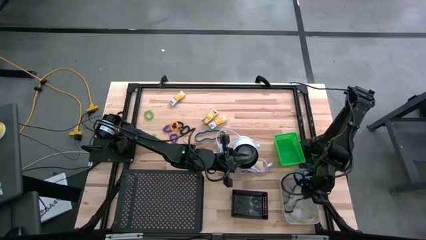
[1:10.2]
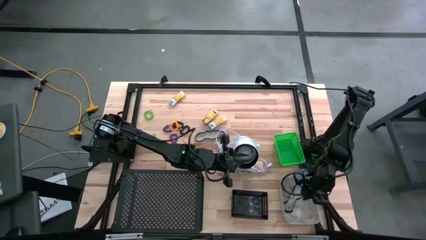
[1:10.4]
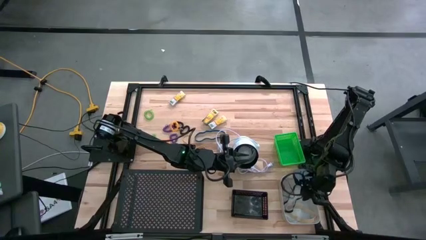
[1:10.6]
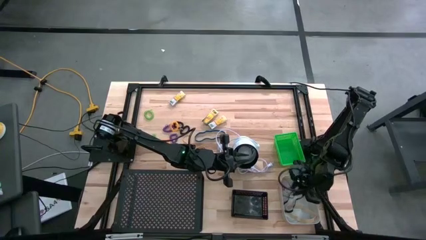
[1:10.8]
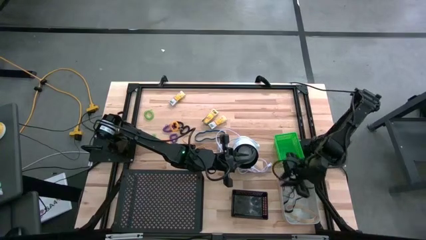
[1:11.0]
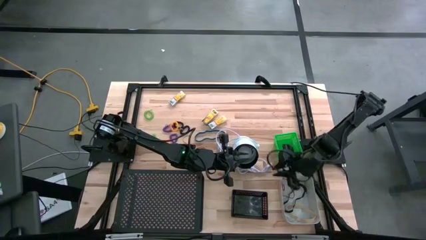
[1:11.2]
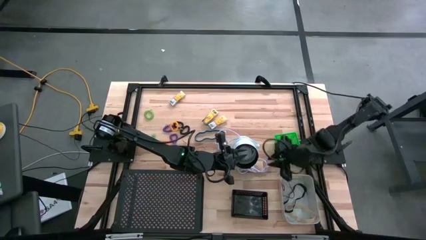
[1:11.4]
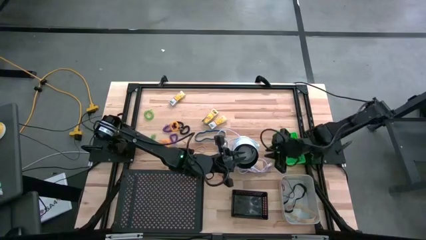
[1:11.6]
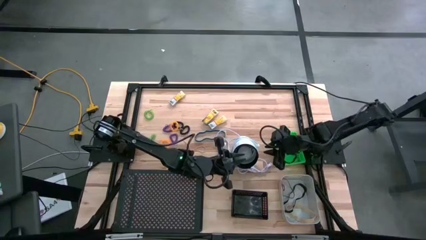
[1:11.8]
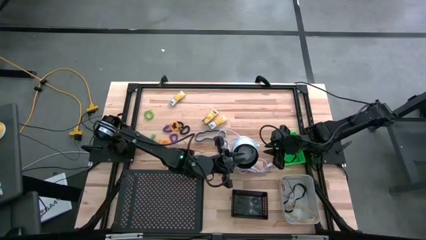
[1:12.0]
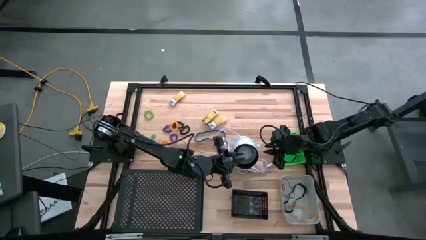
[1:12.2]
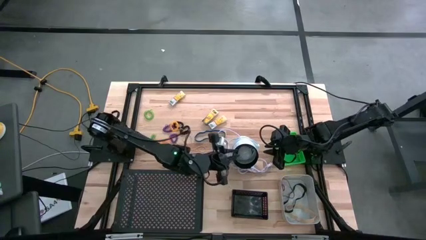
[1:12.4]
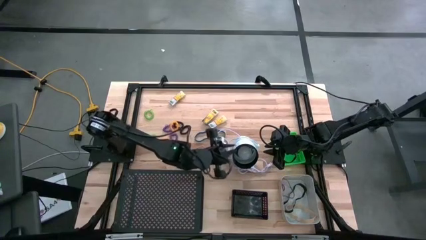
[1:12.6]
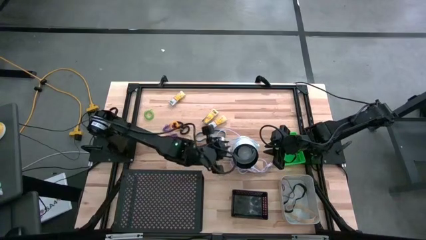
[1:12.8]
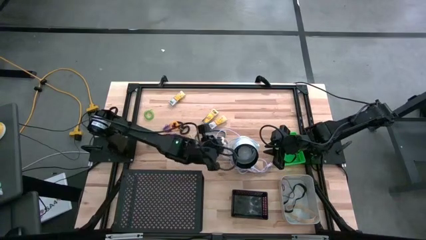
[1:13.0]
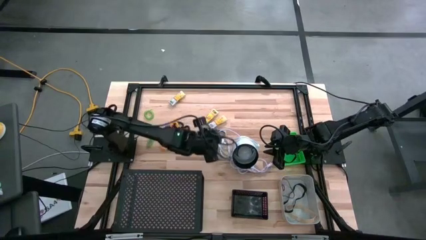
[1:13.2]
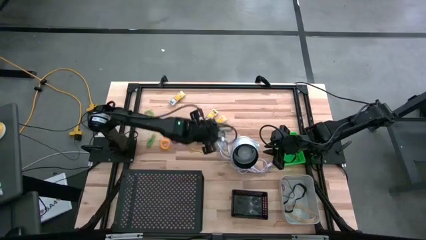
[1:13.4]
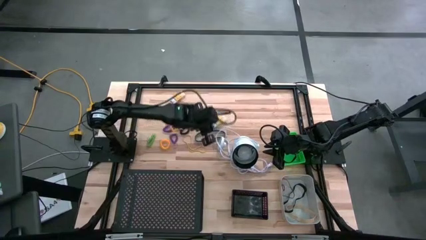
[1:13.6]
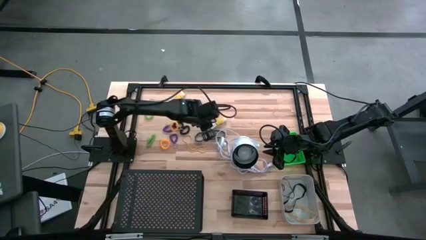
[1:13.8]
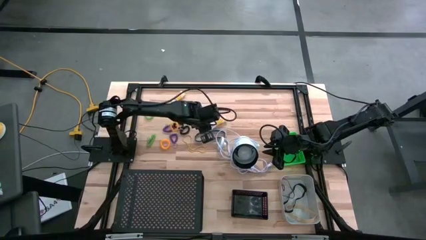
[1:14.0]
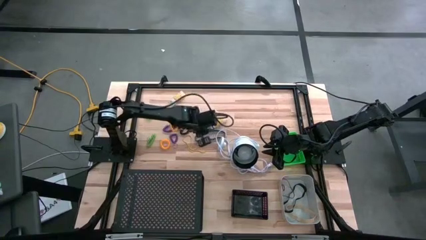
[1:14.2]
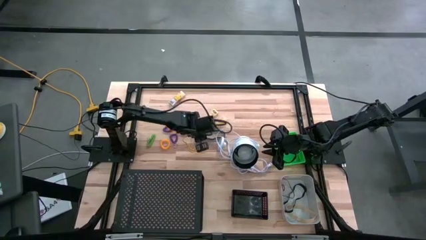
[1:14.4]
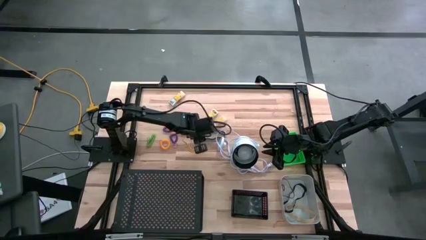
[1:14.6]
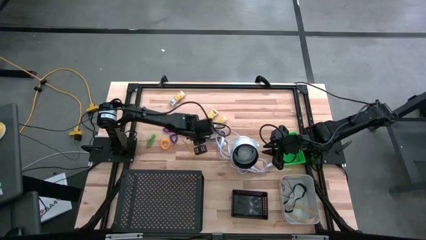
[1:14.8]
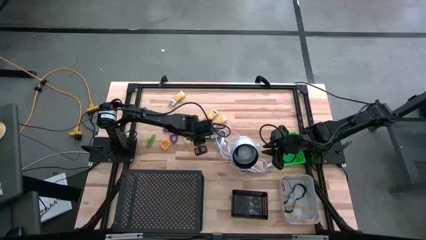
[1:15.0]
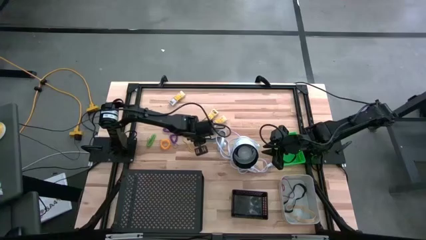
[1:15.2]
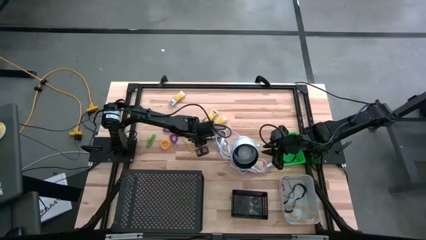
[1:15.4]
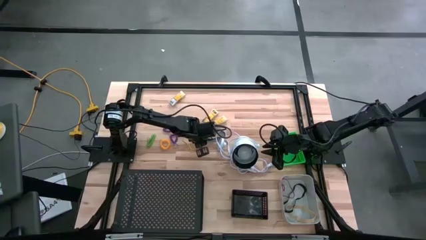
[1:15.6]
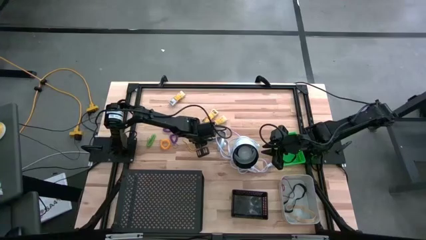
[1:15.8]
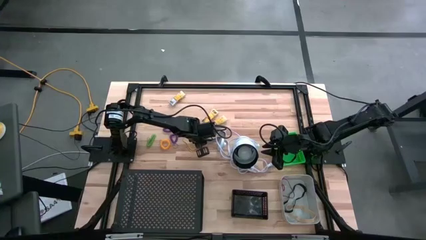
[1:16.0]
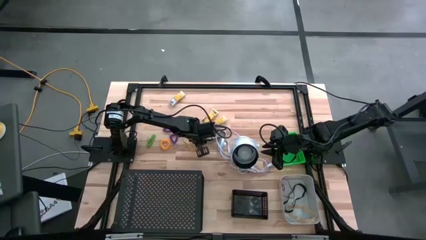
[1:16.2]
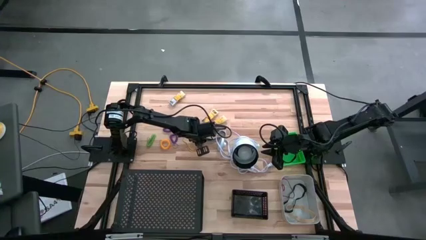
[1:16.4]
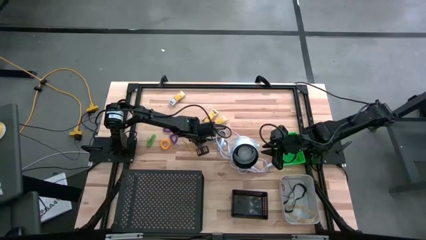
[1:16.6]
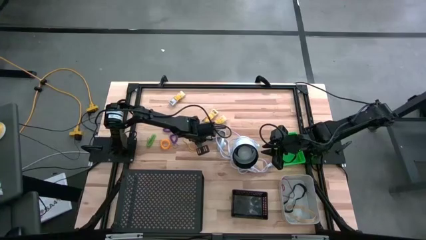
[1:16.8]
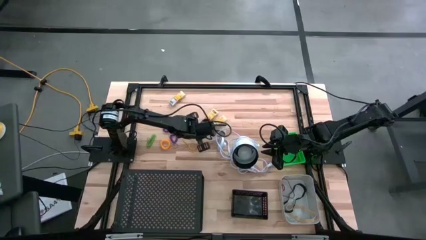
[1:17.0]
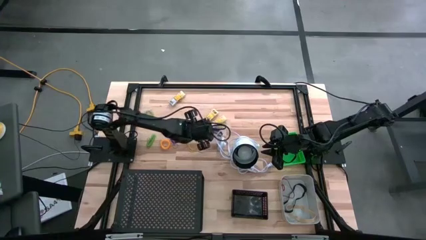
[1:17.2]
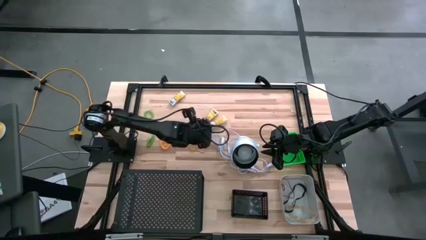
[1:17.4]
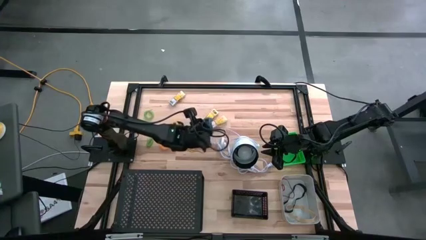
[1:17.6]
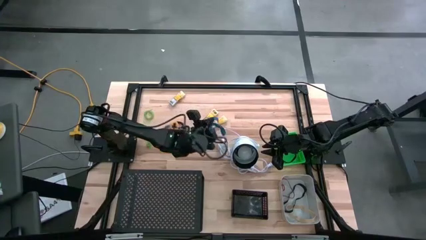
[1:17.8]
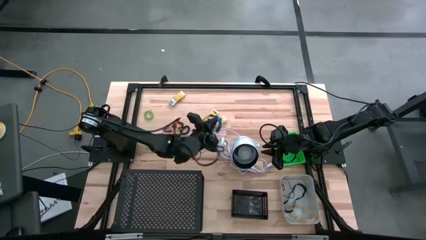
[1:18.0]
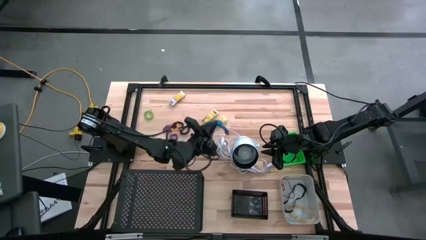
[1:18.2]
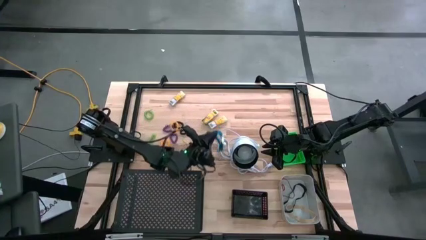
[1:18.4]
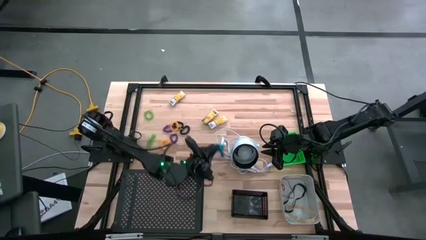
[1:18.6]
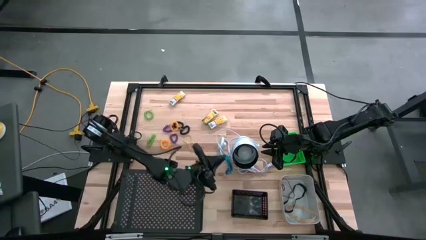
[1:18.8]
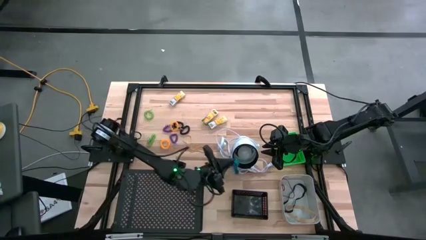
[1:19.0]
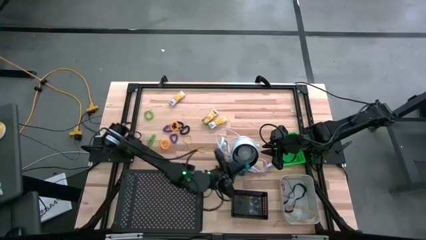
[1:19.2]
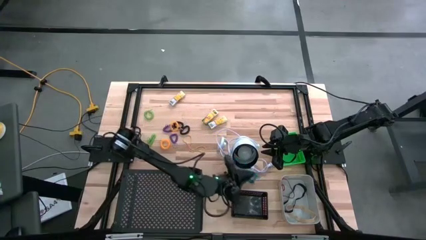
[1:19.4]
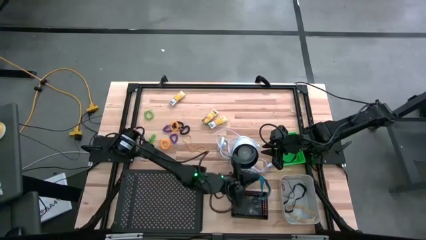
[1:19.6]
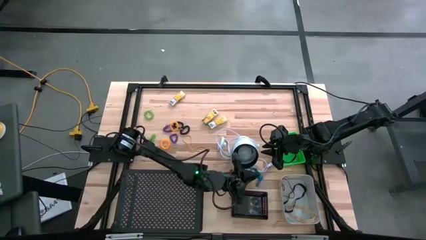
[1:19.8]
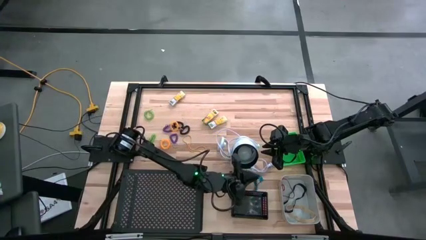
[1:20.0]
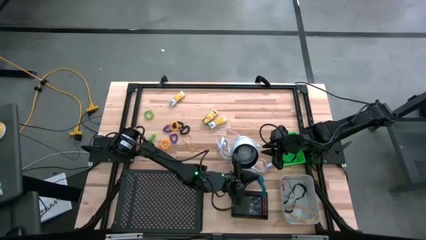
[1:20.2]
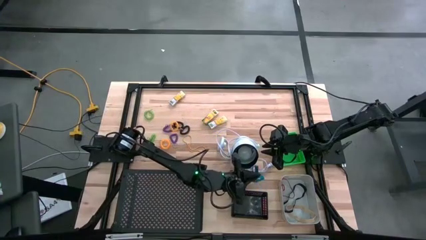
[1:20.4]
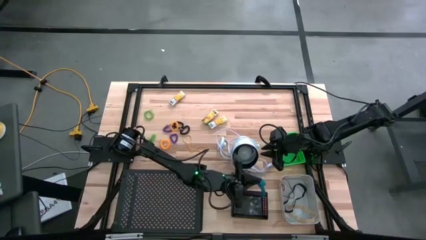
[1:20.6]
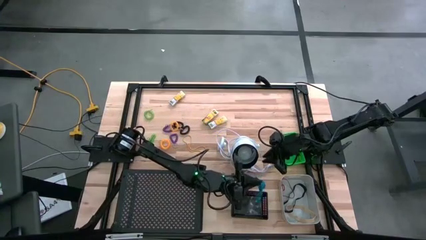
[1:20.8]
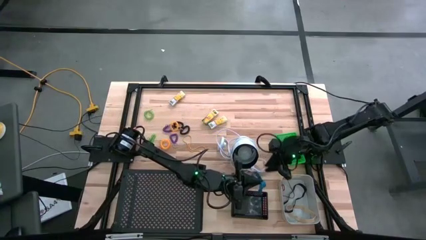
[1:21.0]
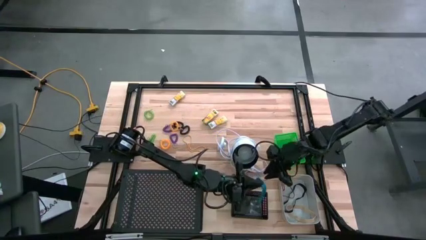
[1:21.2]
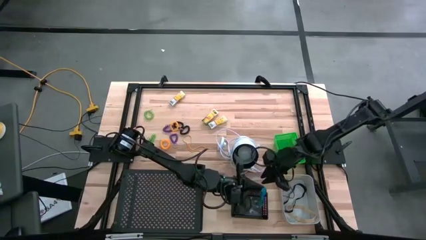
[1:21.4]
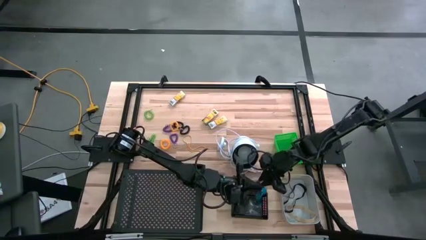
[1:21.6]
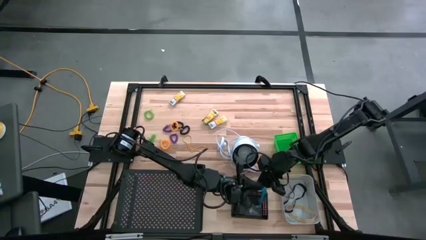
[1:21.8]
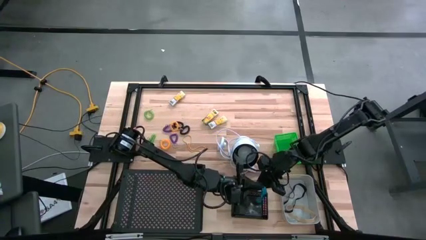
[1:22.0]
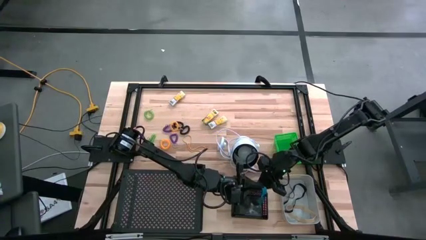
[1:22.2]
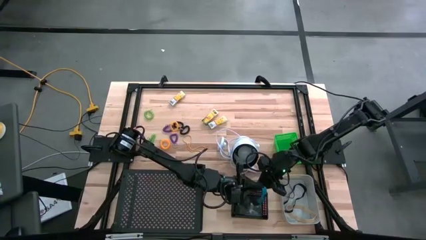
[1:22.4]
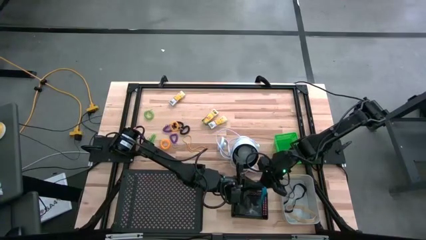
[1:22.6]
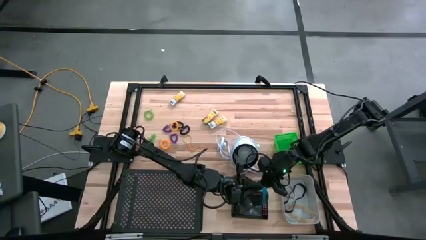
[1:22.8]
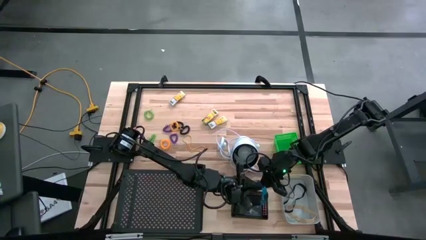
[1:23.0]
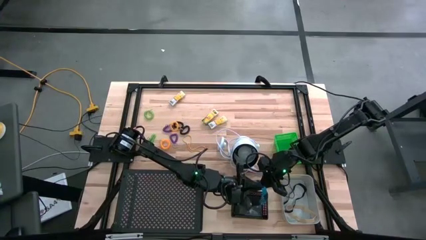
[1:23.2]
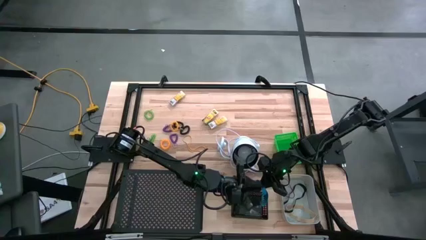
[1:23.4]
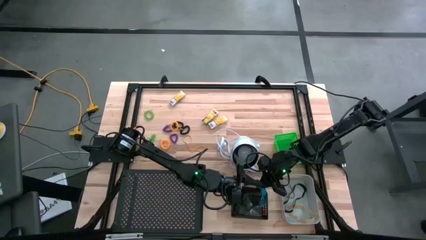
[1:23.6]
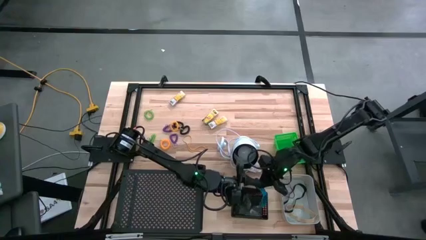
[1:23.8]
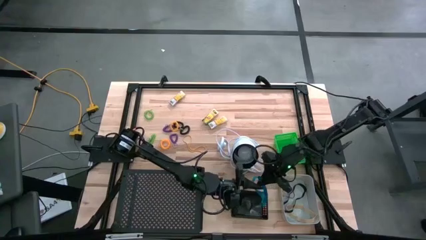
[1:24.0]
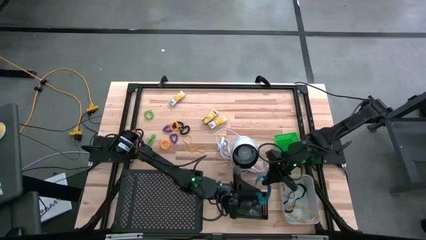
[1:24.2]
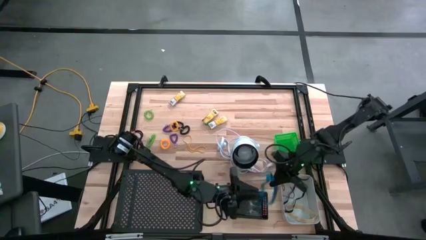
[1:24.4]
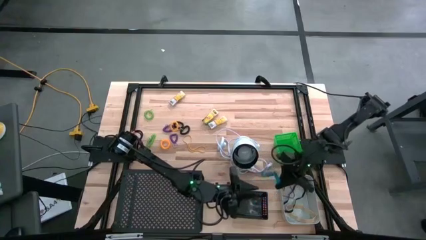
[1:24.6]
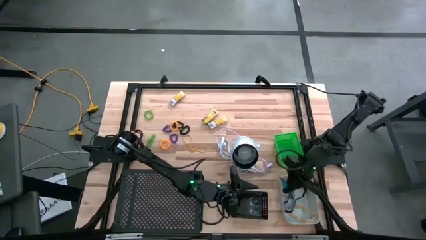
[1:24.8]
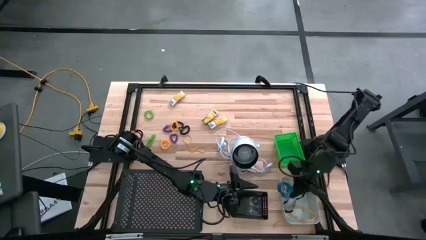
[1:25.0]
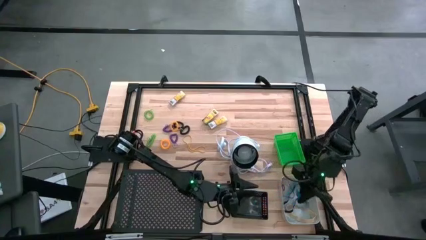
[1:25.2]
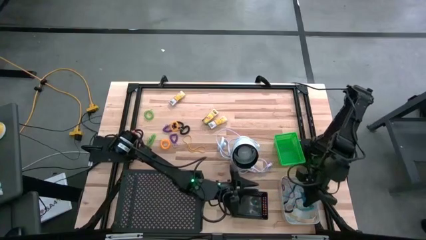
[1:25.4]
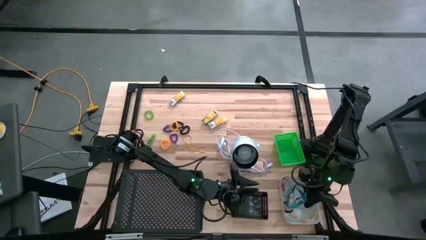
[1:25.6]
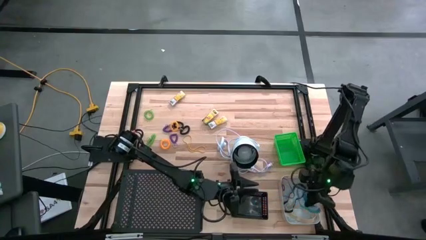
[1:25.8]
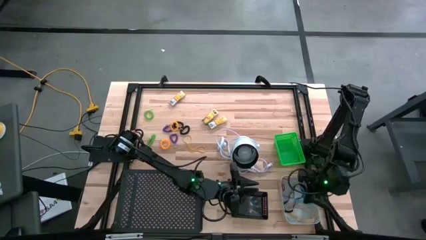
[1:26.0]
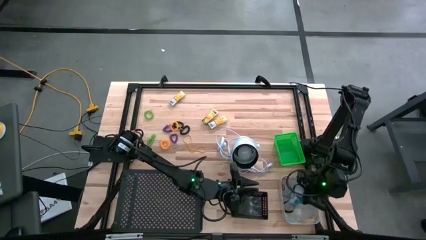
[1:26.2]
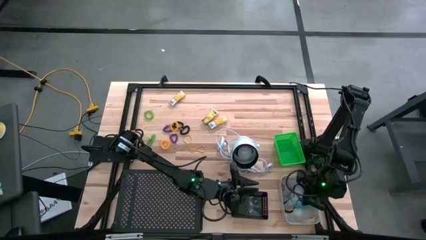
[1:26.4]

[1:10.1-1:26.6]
Task: Pick & Place Office Desk Supplies
Put the blue rubberband into the gray bin
